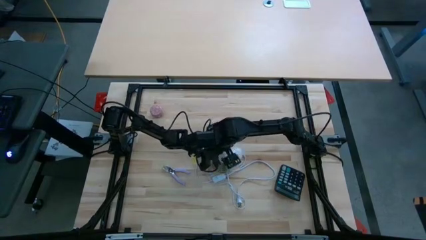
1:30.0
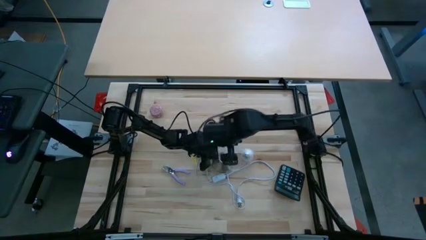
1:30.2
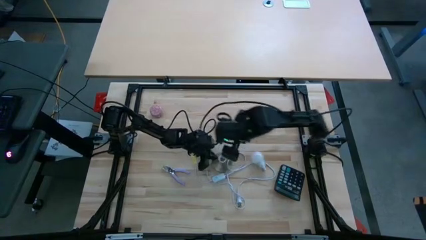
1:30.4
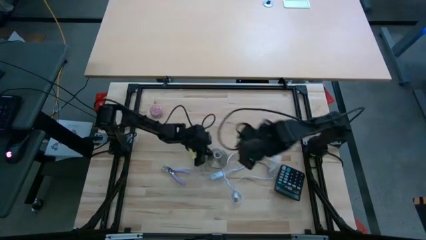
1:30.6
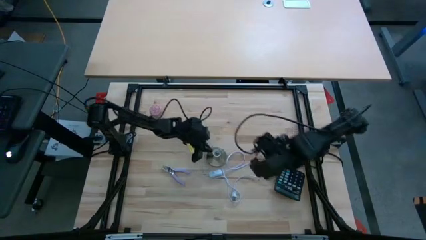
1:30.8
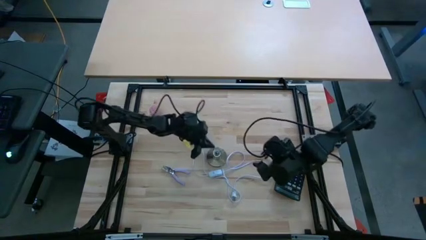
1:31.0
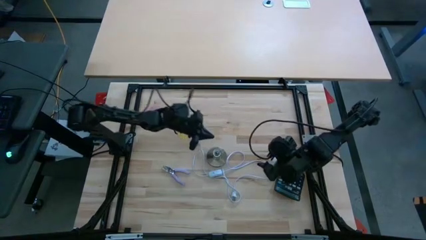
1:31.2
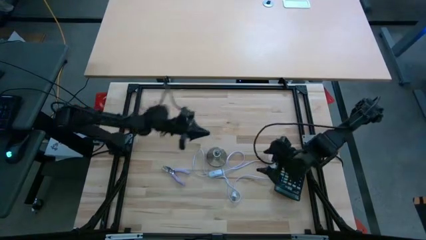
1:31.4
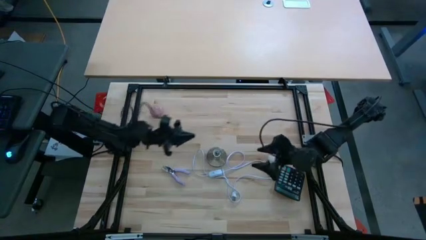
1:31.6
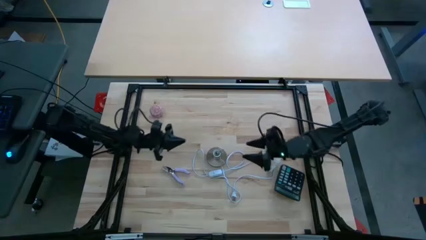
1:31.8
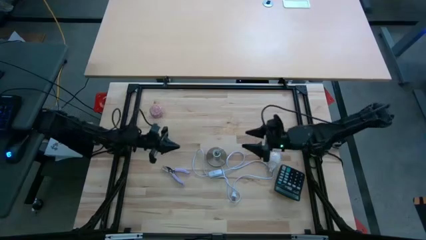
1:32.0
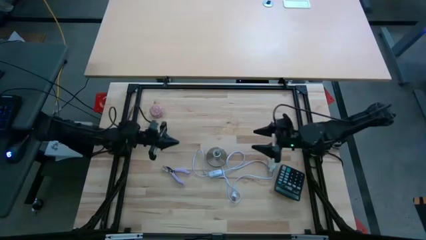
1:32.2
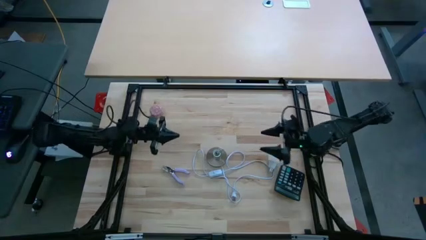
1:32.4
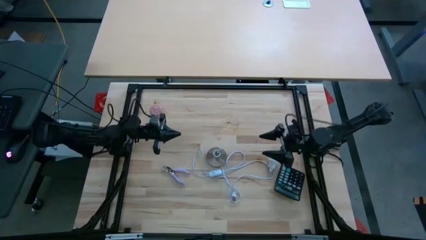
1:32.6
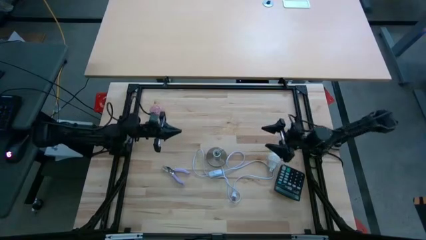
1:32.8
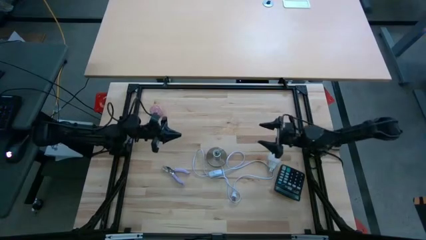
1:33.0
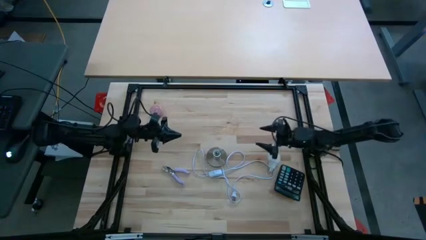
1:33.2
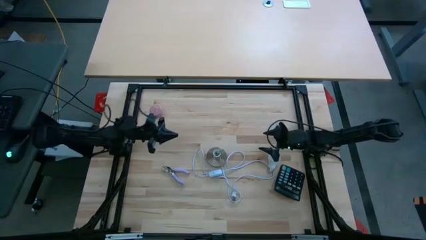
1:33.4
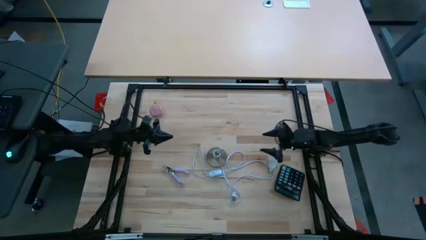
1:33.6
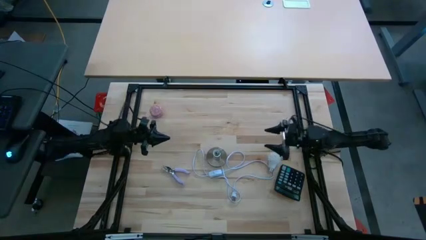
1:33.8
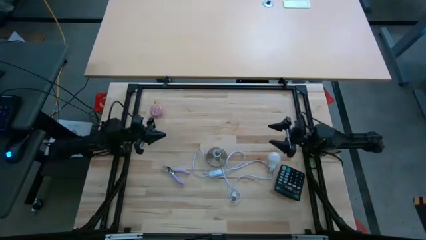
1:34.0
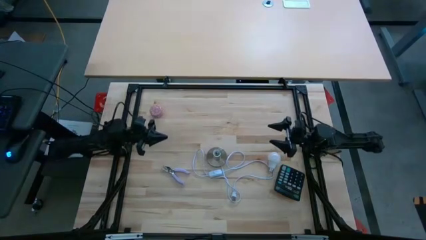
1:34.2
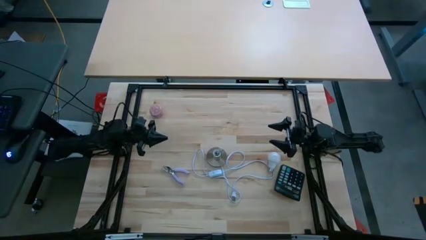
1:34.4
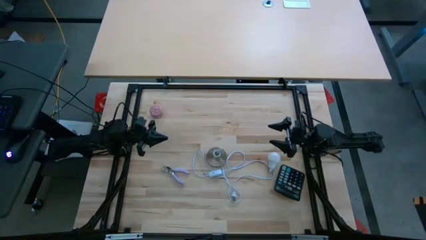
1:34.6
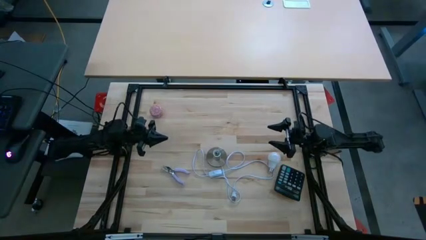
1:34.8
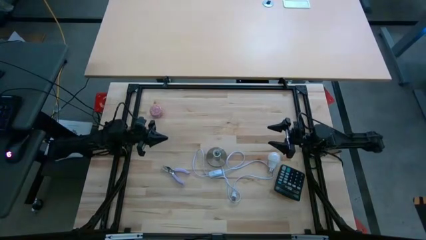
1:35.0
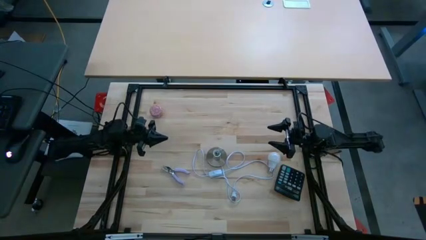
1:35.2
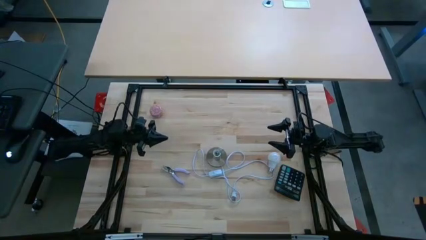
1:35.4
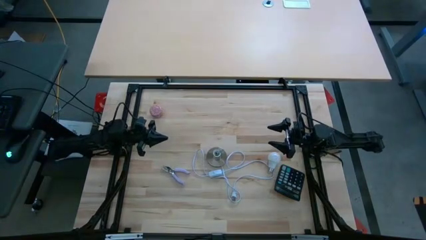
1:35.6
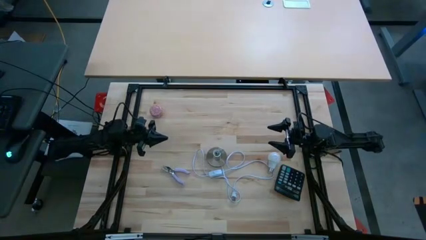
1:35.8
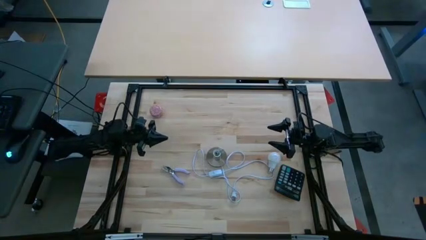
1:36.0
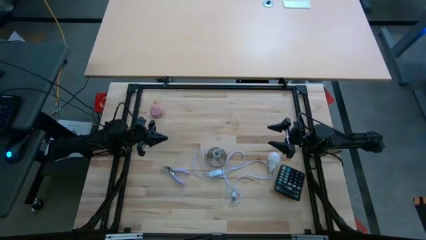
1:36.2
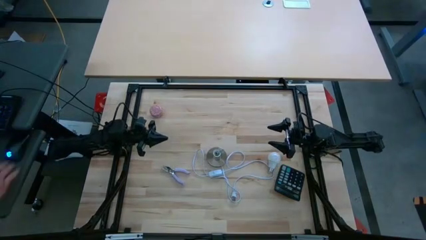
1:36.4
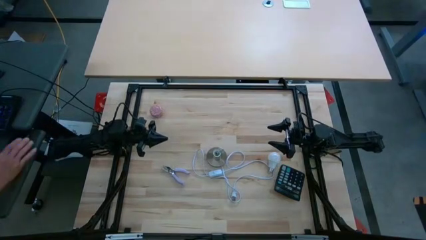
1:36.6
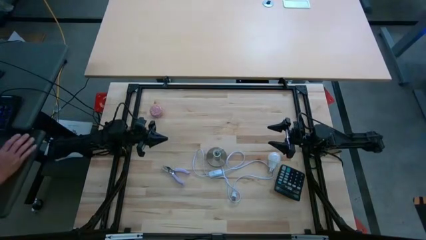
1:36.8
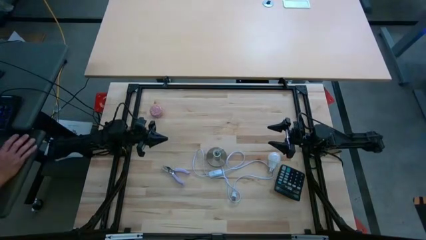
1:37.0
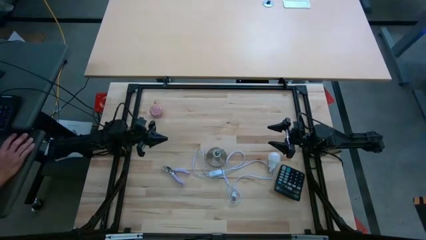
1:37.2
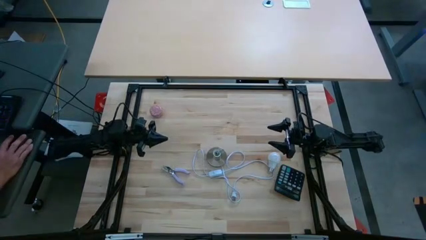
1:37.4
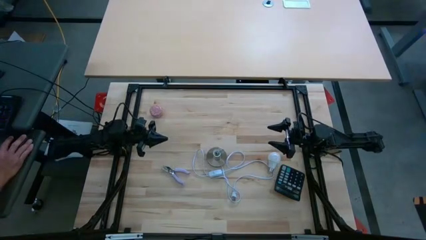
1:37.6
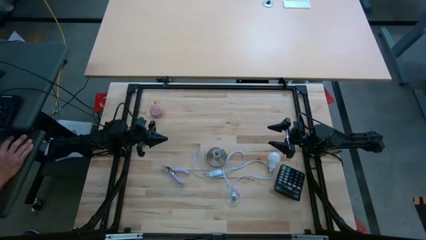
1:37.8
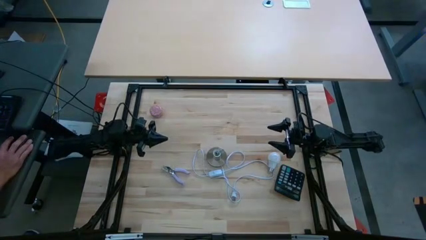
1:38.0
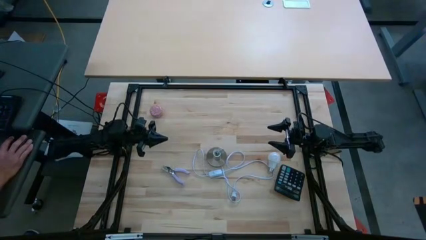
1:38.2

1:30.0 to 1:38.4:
Task: Screw lightbulb
Return to Home Position

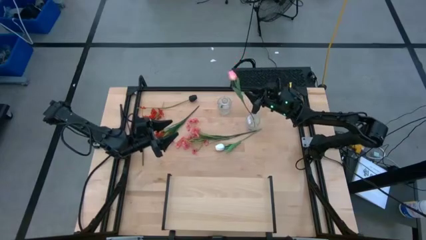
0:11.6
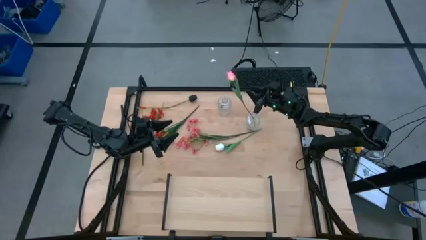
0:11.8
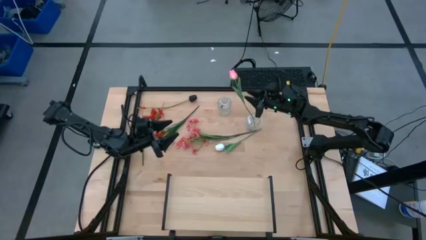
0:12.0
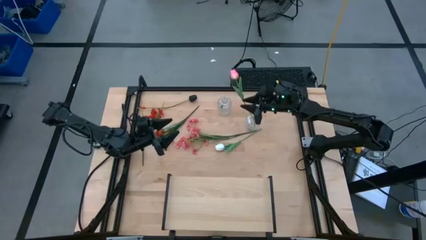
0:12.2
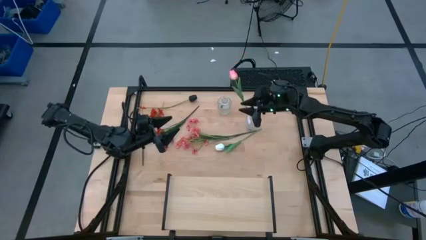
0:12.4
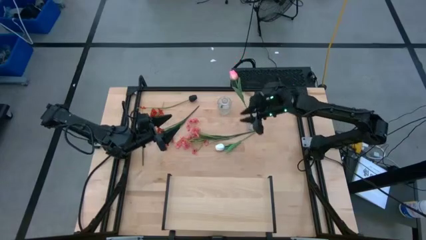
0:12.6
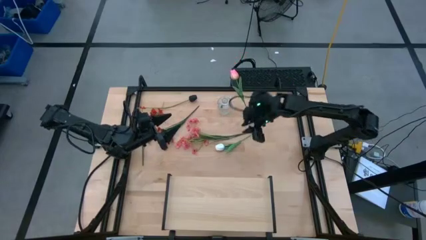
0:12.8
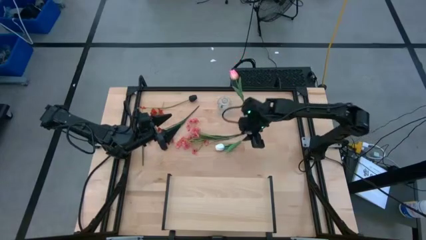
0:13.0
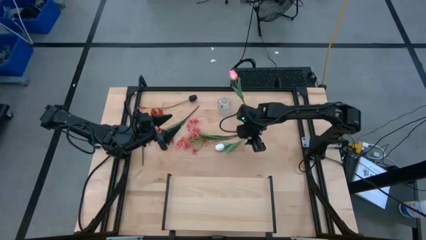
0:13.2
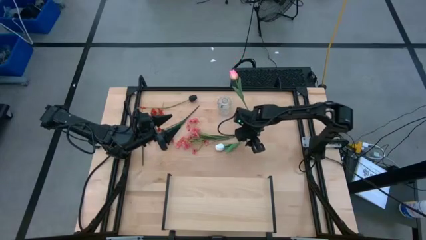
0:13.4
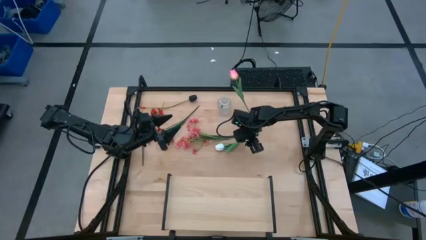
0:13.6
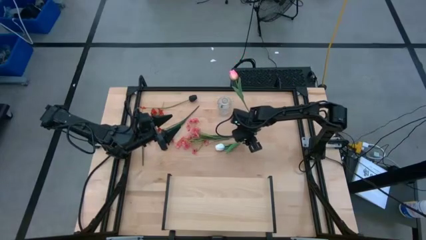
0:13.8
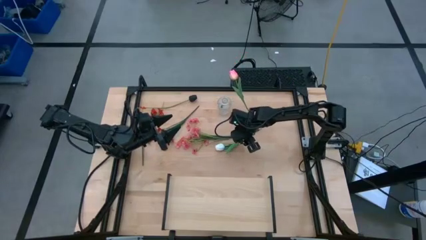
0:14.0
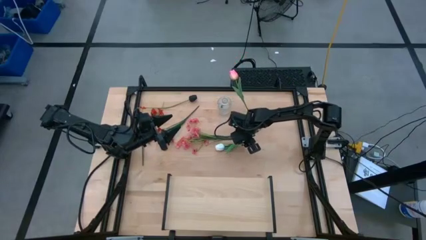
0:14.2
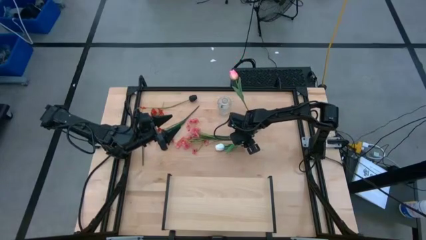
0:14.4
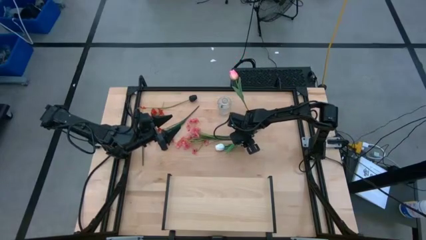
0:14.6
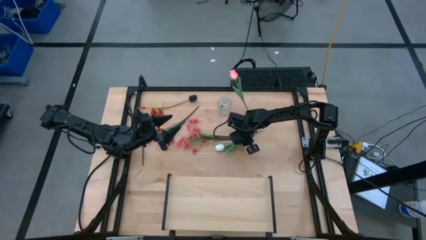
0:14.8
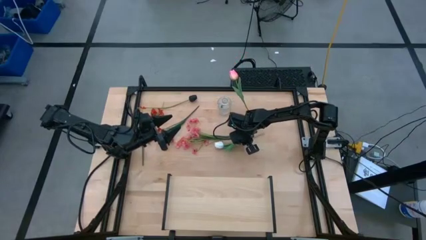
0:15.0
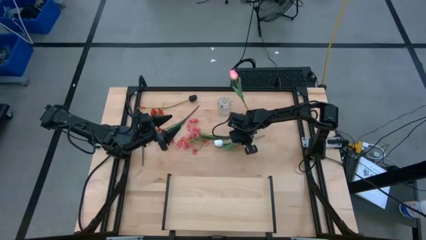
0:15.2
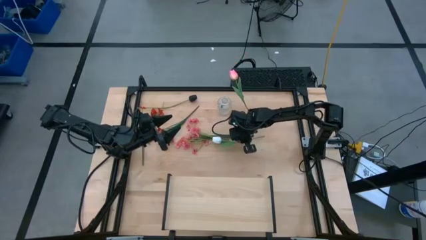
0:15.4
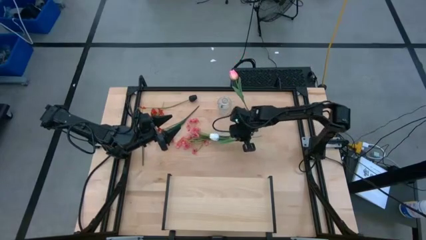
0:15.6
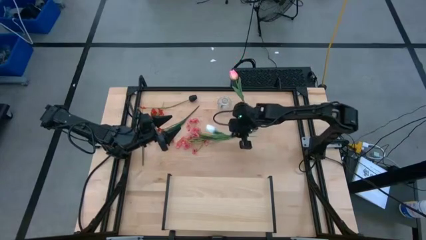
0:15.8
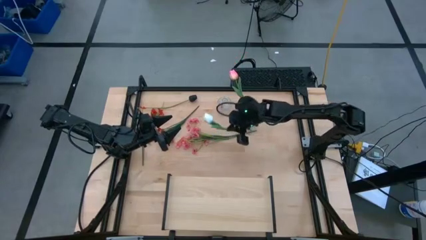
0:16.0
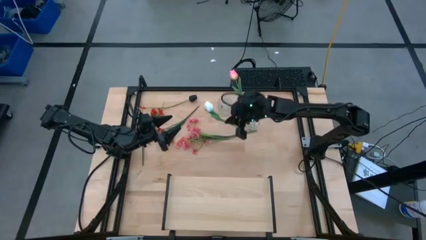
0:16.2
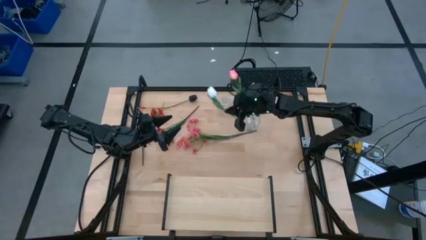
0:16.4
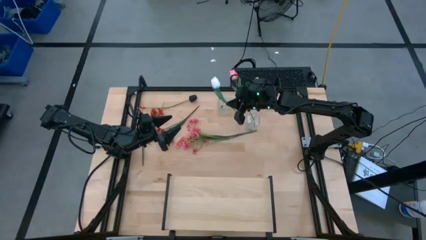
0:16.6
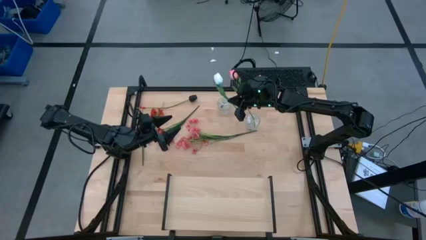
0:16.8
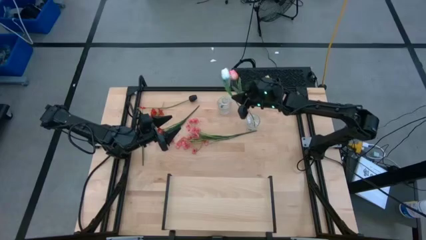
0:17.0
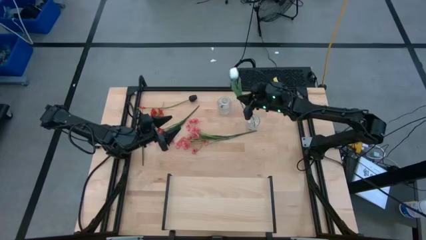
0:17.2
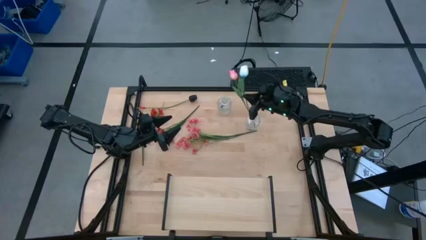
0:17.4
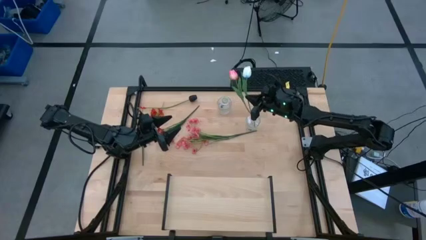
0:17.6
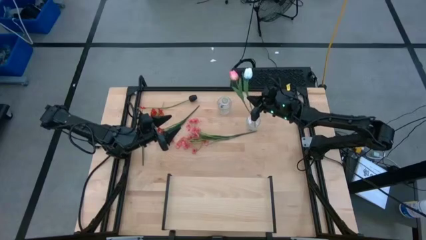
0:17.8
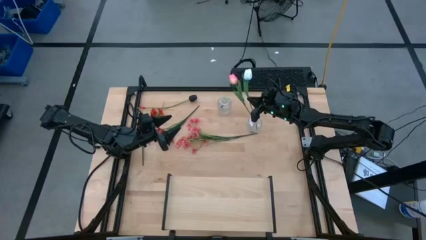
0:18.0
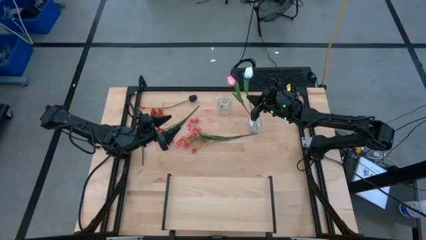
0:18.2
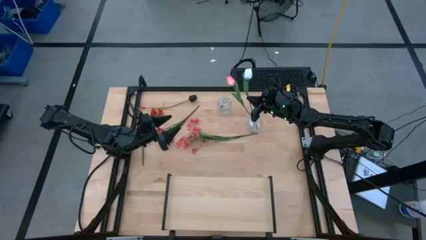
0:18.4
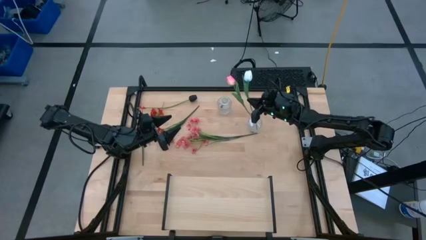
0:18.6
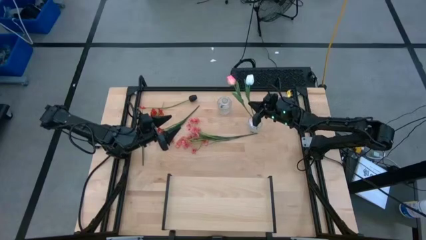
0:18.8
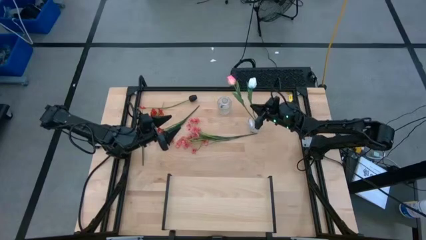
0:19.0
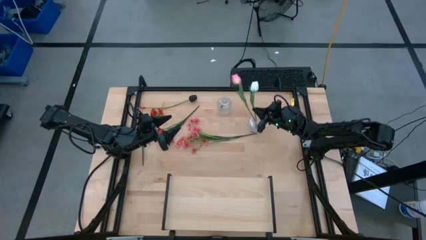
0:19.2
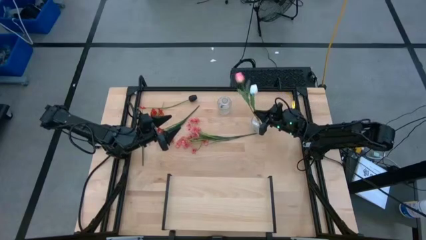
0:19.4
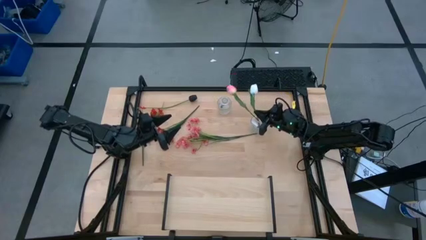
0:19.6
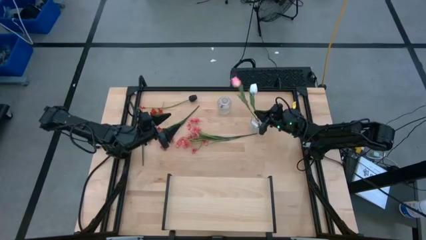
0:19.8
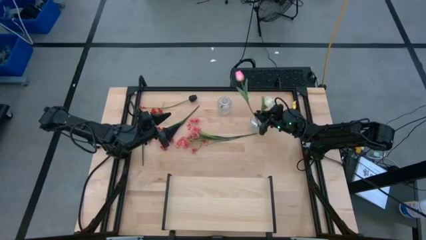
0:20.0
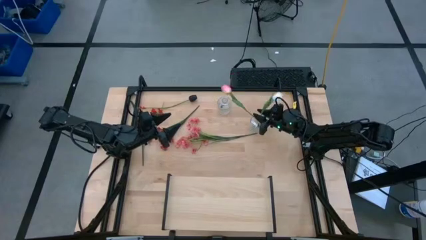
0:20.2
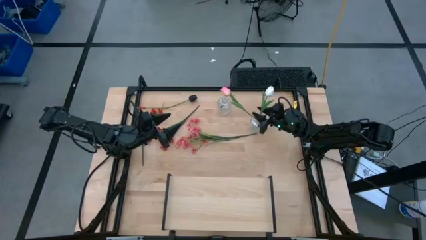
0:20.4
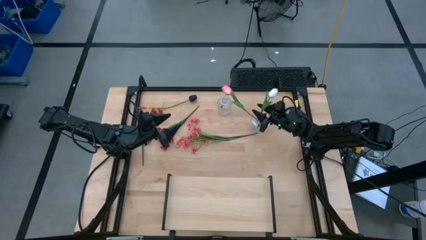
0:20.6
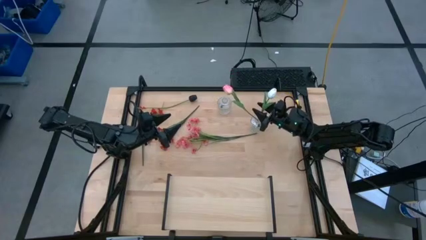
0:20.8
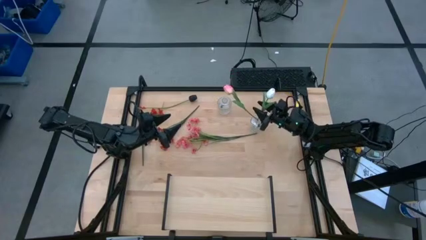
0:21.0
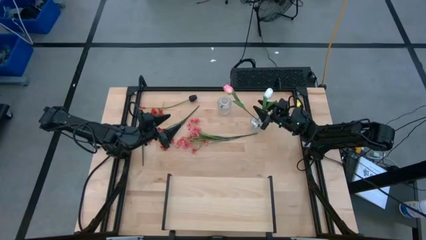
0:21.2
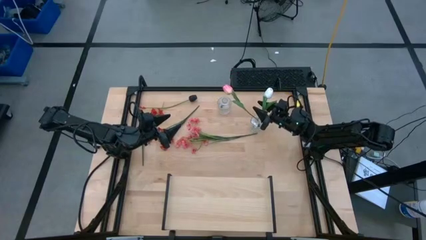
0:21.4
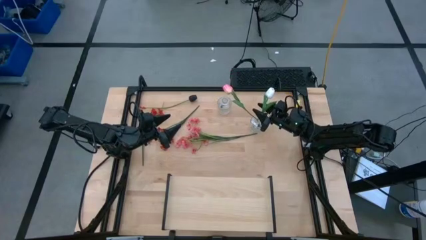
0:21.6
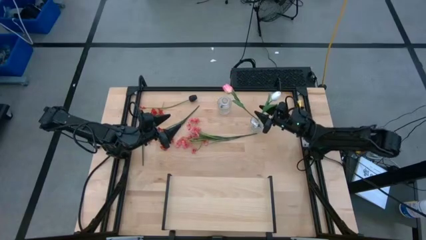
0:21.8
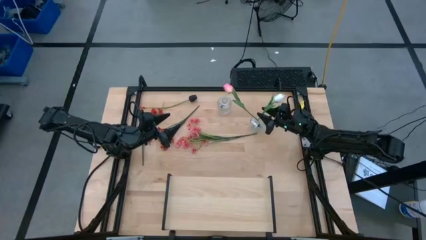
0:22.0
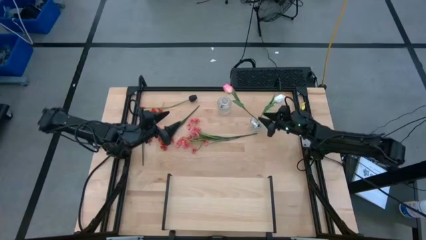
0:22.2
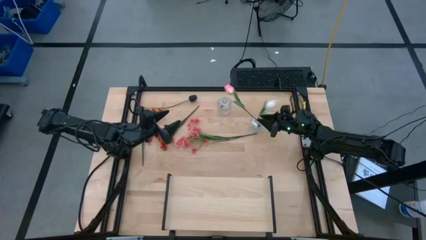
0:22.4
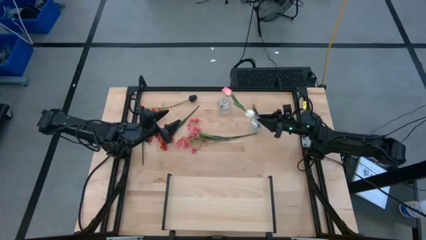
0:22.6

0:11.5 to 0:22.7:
Task: Pick and place flowers into a vace then onto a shelf
Put the white tulip into the right transparent vase
